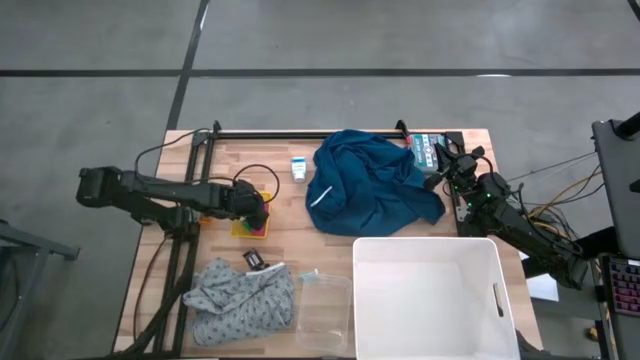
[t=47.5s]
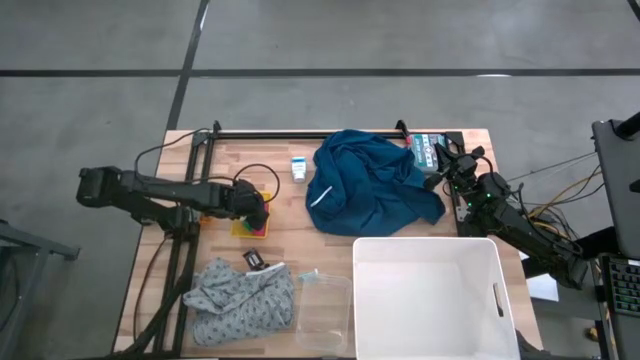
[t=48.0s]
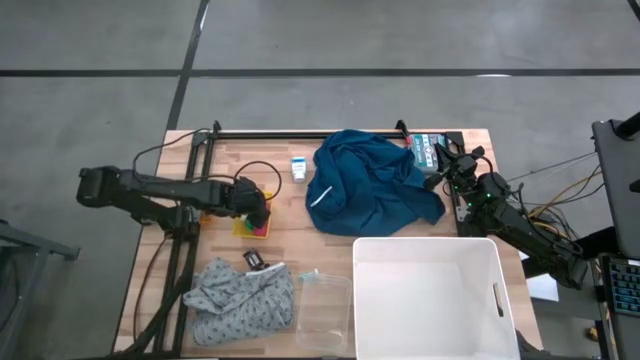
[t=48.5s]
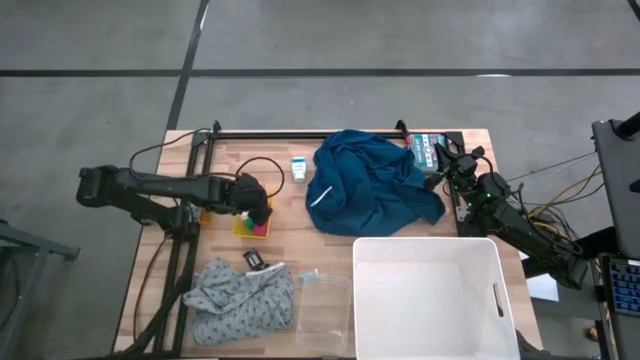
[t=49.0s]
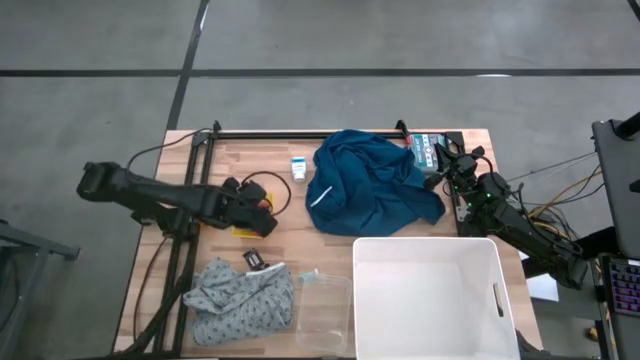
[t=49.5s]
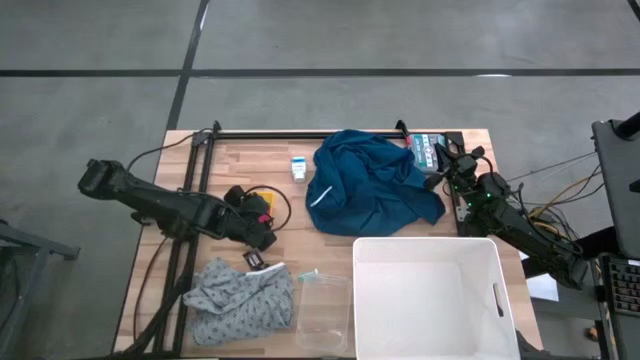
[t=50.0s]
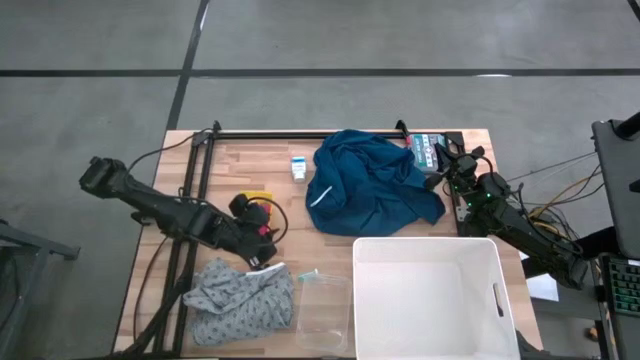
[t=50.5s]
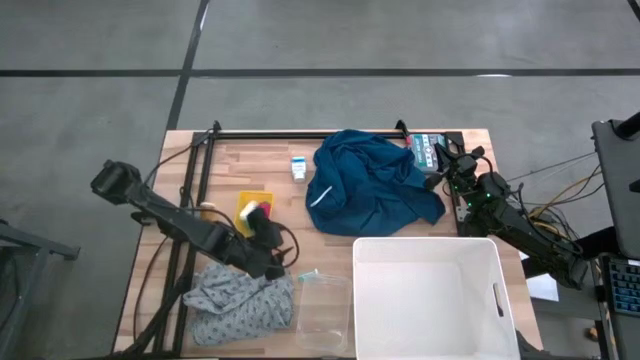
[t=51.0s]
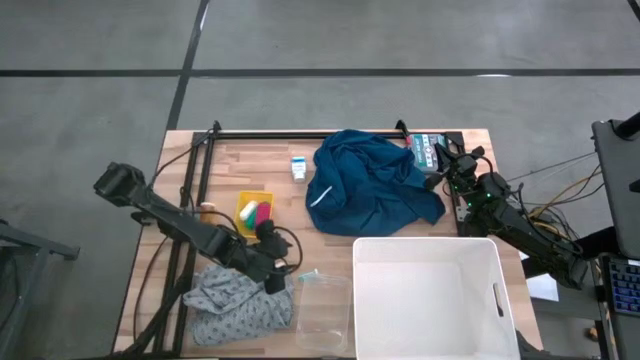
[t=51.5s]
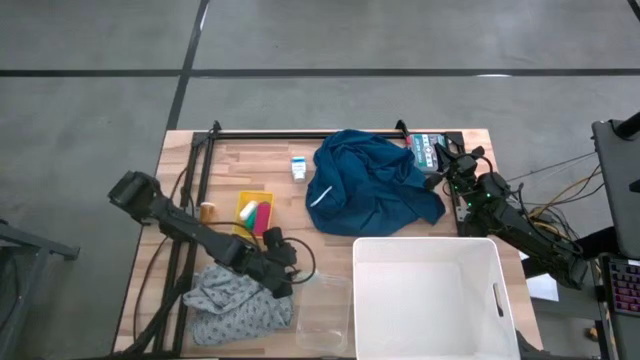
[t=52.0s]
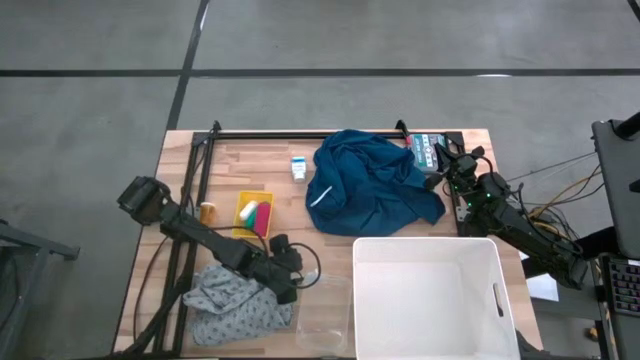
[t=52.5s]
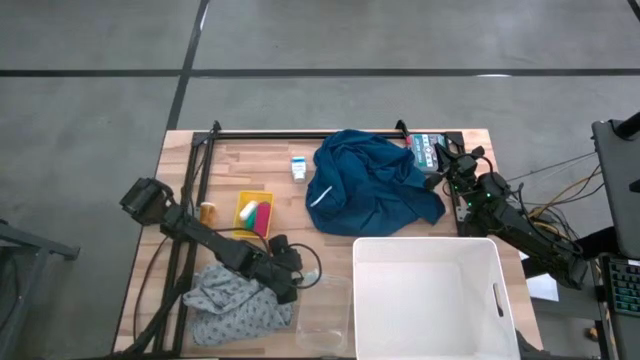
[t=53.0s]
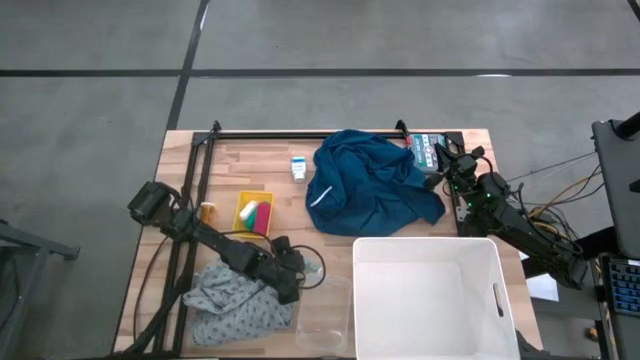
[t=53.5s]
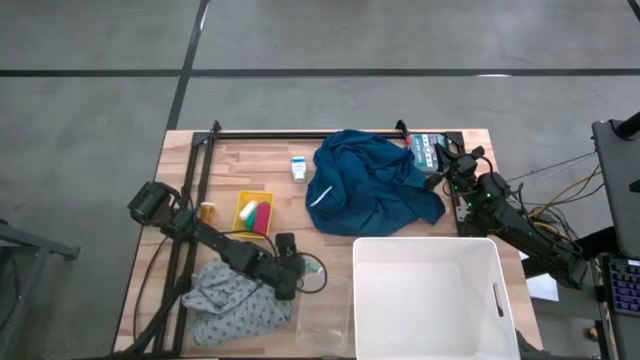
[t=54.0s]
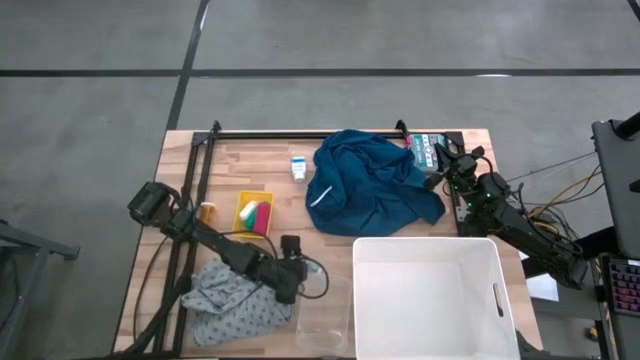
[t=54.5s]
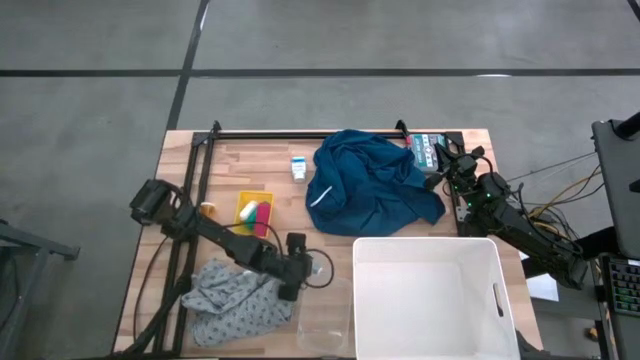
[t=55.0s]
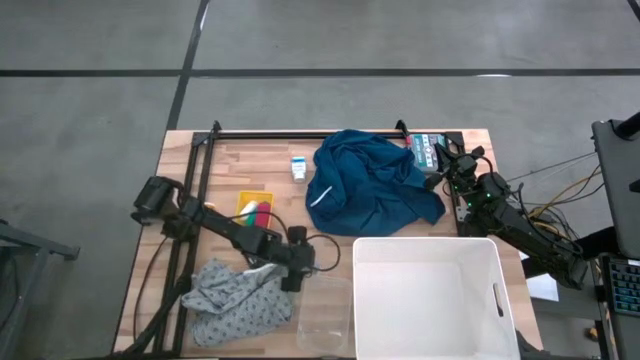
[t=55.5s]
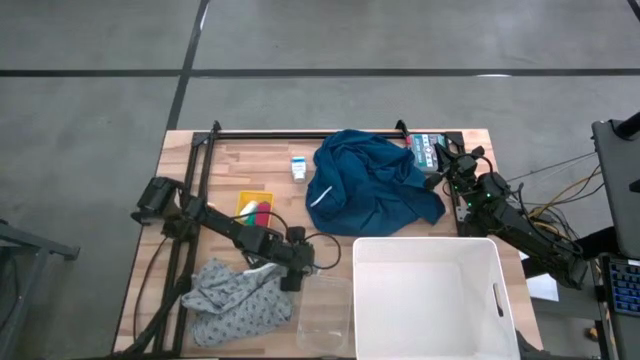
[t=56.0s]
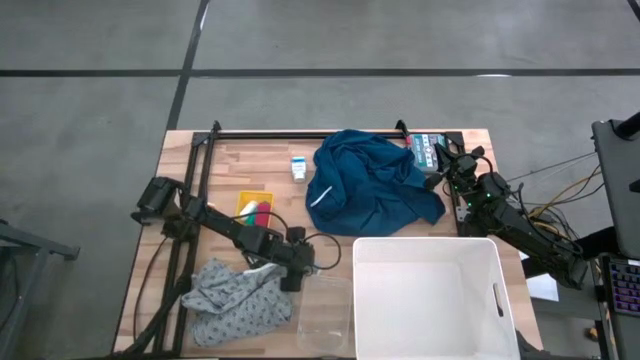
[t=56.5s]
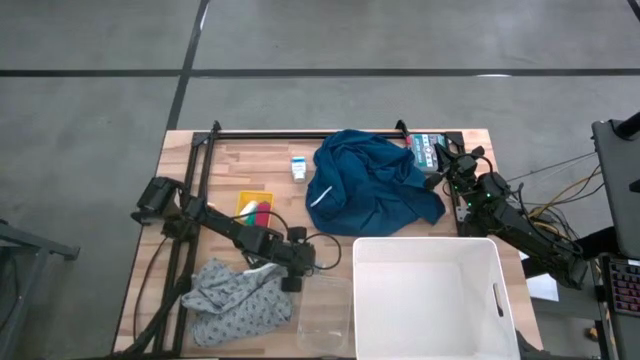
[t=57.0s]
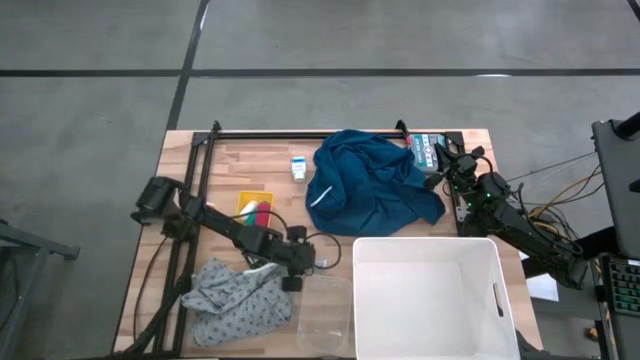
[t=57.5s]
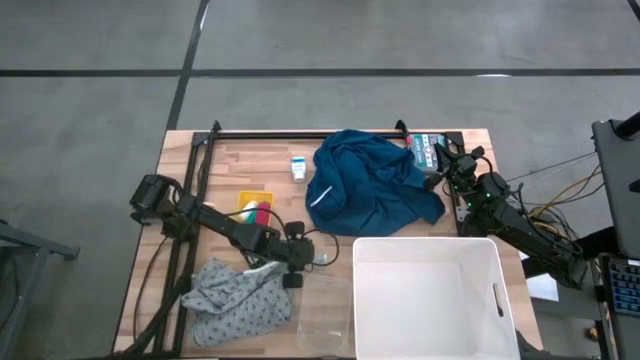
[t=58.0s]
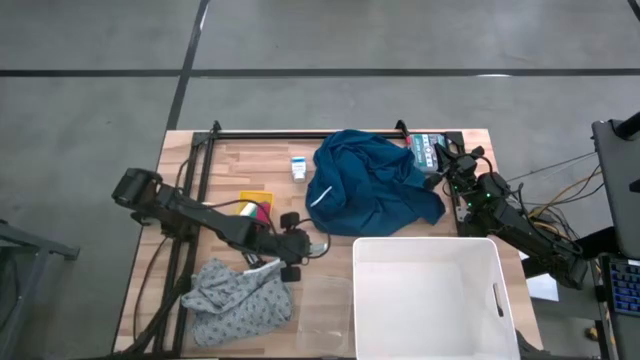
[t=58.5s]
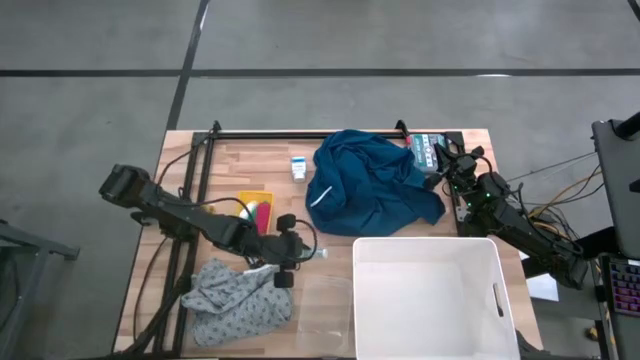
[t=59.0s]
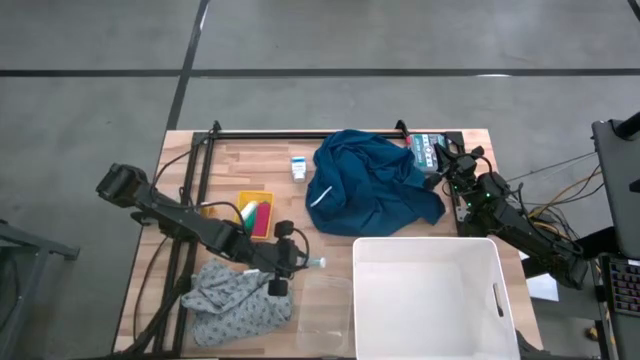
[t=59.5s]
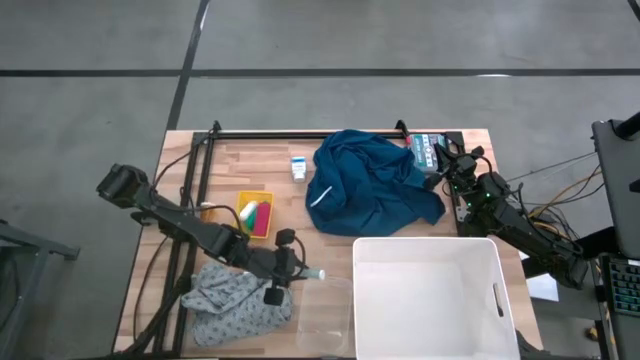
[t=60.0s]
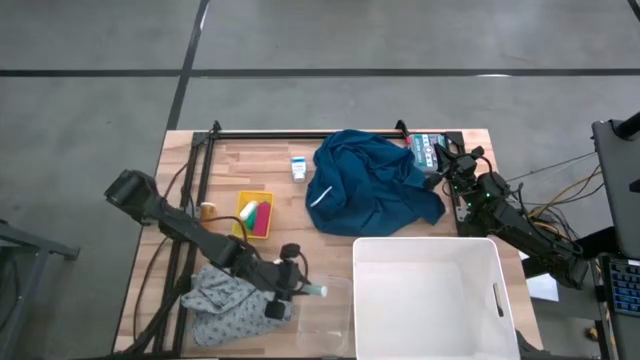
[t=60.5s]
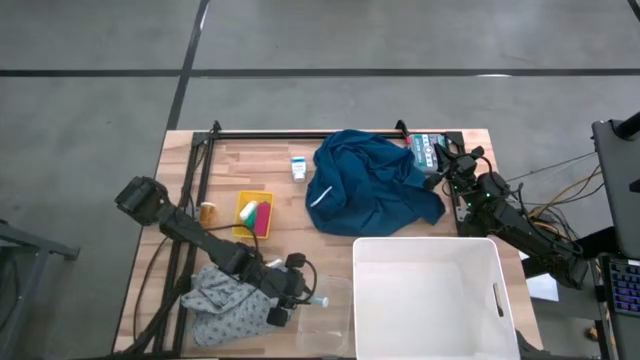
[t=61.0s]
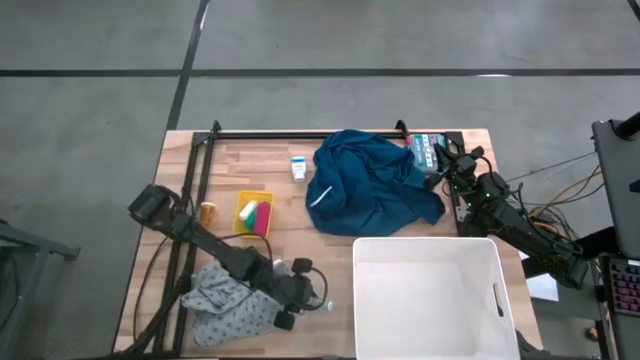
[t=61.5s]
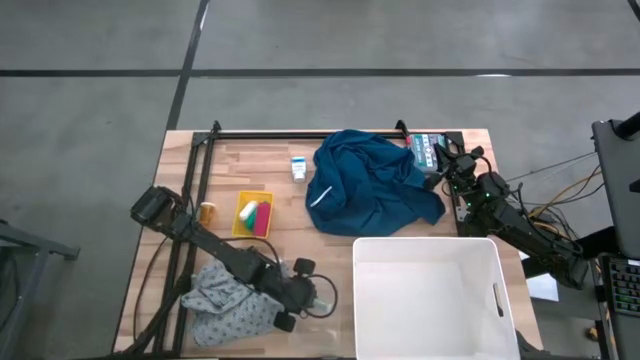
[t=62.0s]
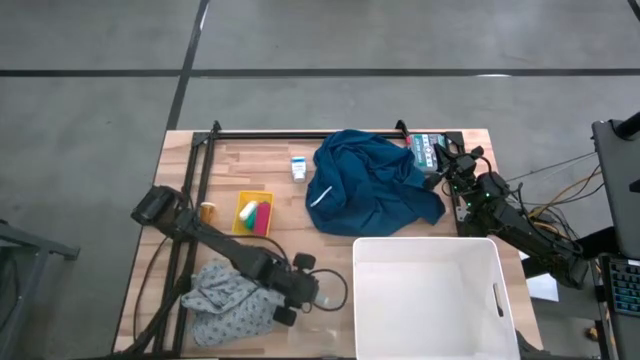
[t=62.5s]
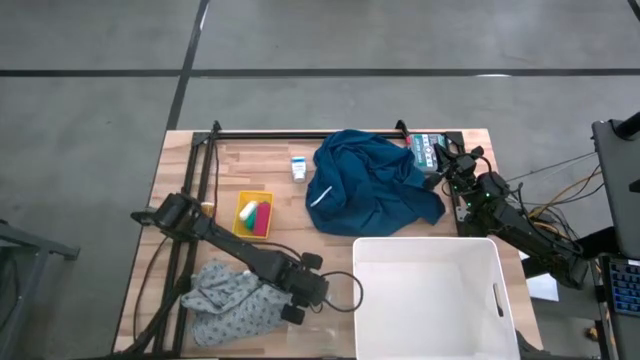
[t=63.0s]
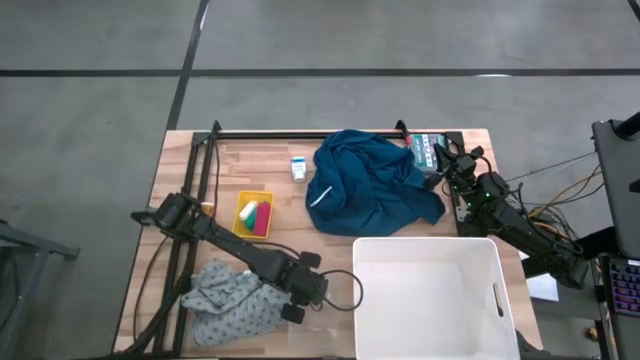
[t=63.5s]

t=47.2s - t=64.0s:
Task: Pick & Place Medicine items
Put the blue pill bottle into the transparent bin

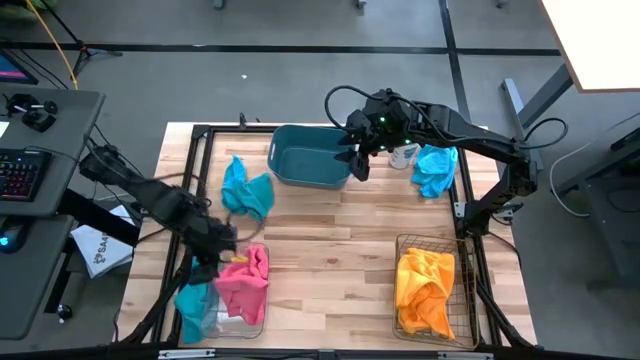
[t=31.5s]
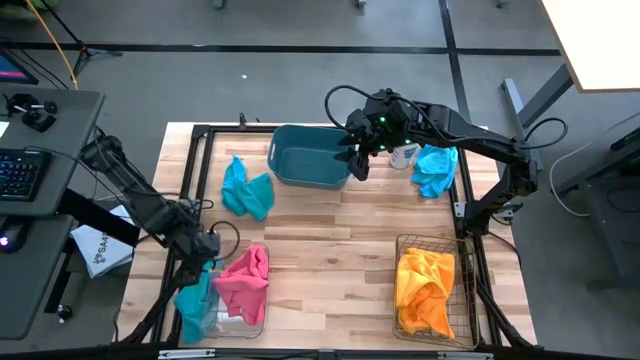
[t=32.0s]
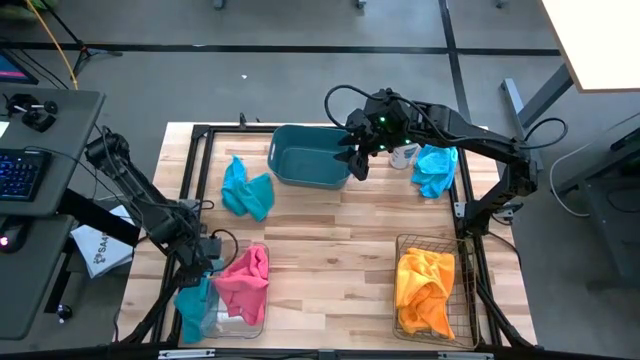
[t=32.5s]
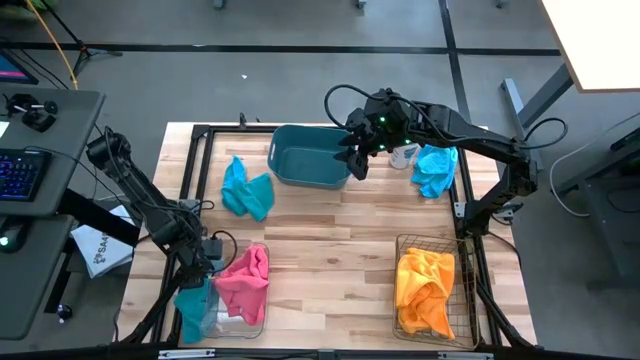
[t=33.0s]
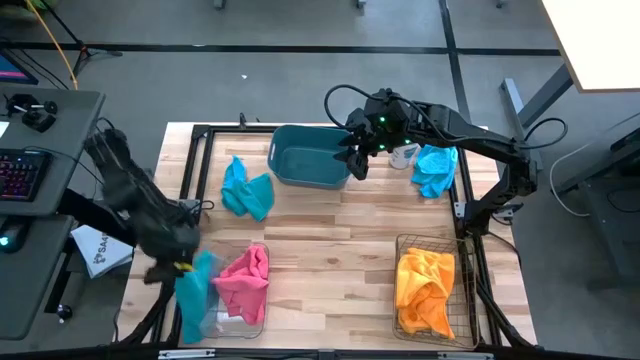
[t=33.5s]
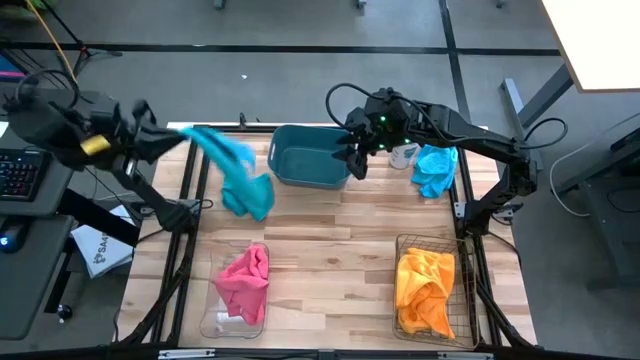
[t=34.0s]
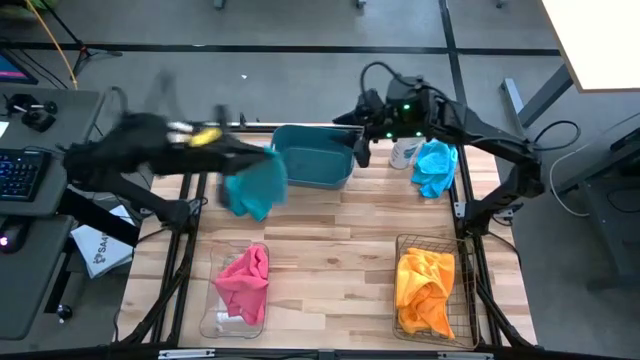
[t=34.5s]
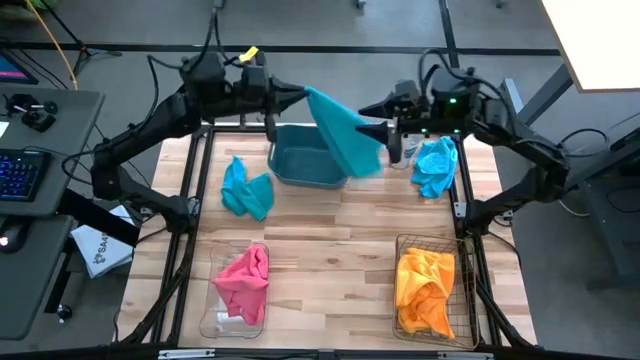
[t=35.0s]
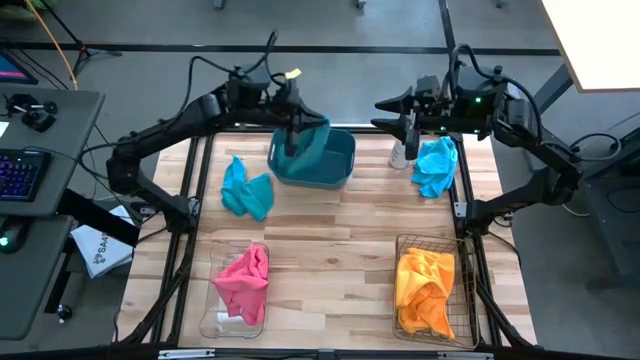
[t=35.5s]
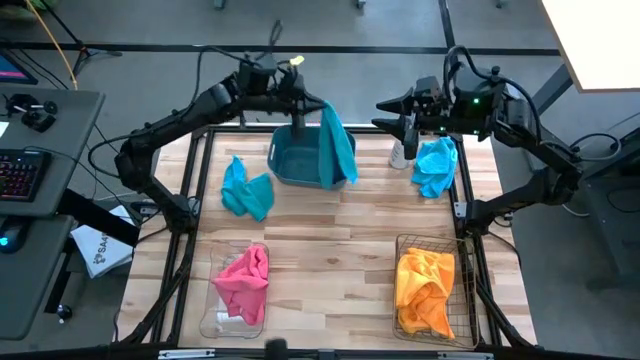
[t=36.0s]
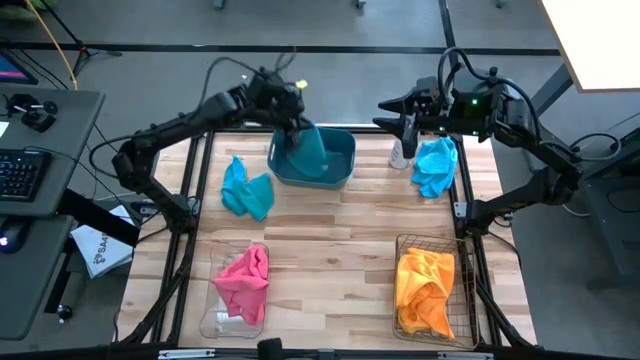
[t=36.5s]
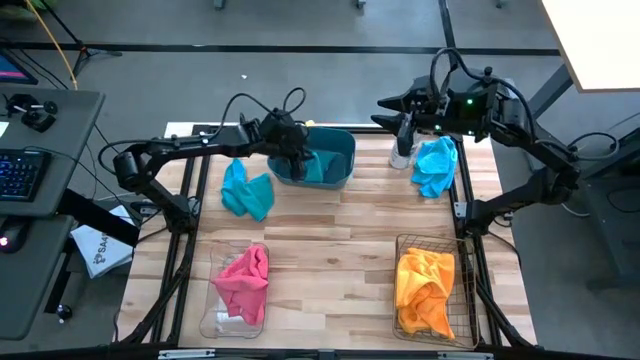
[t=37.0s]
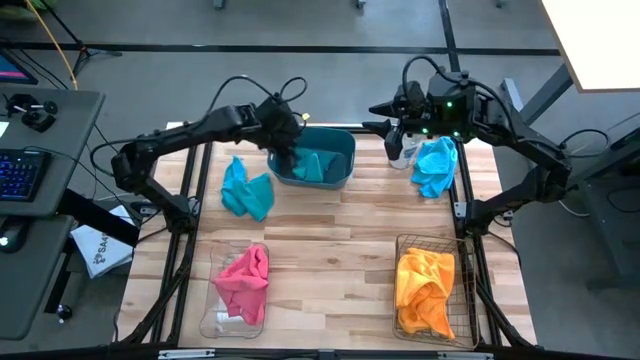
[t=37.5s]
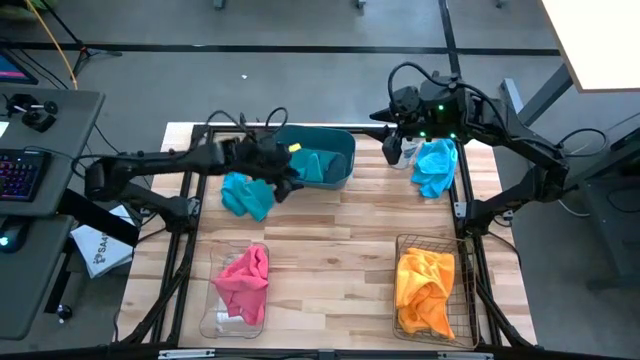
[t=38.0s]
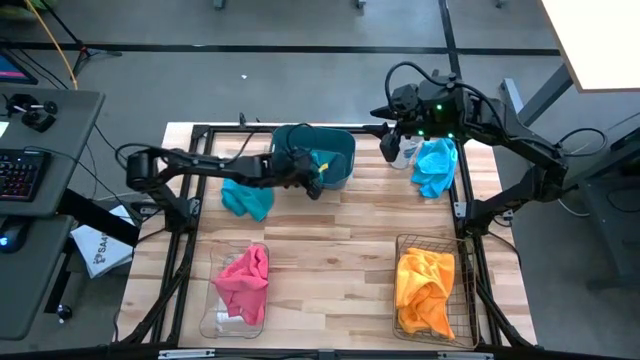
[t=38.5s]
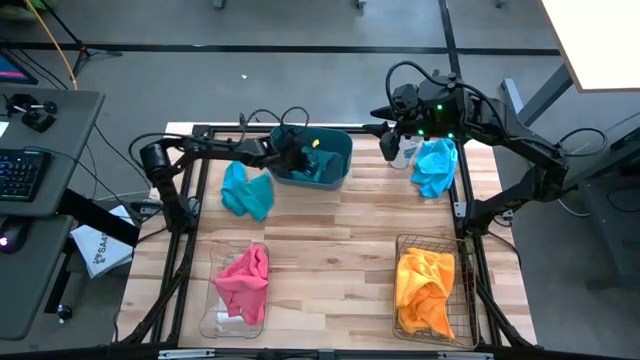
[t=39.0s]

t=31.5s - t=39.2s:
Task: Sort microfiber towel by color & place in baskets
Put the bottom blue microfiber towel into the blue bin
